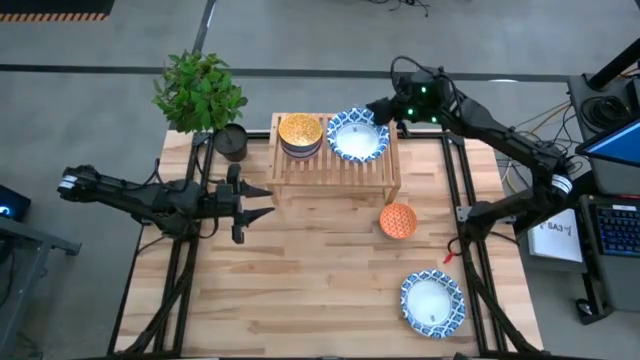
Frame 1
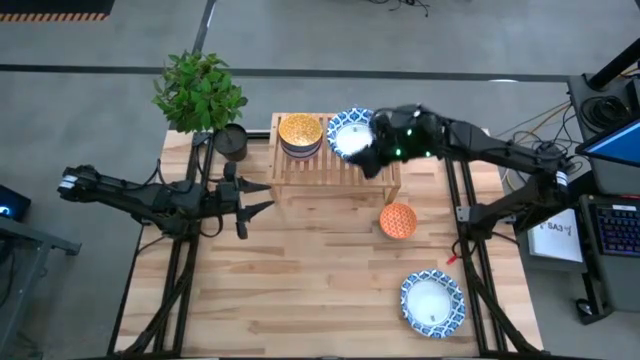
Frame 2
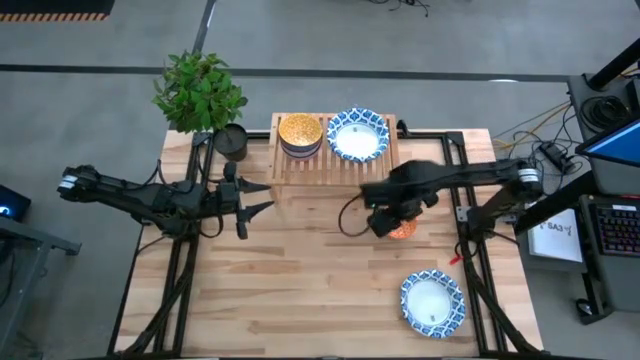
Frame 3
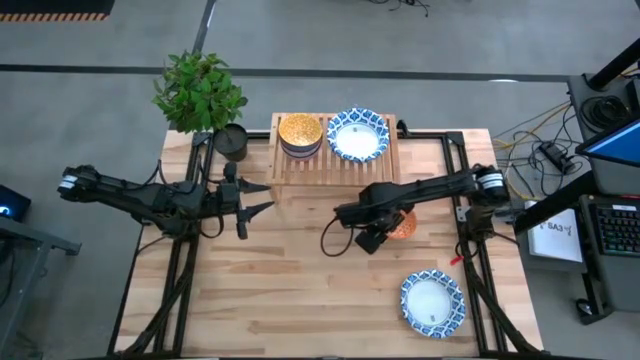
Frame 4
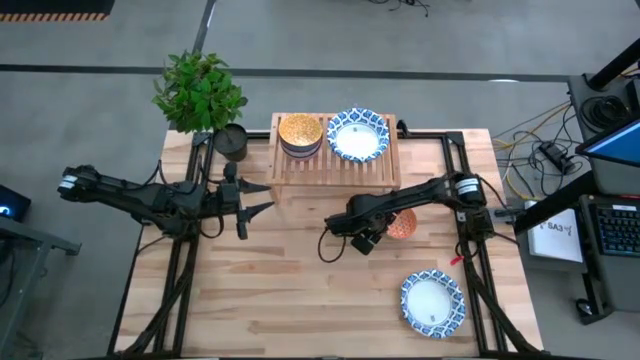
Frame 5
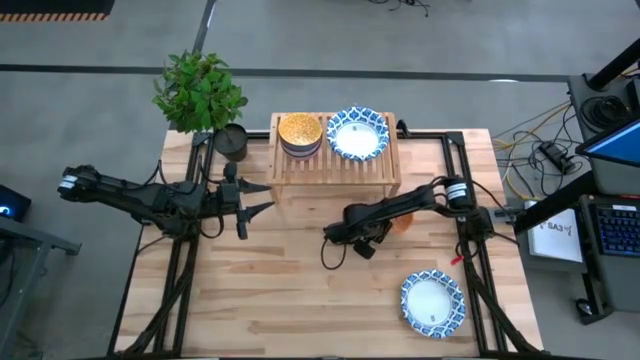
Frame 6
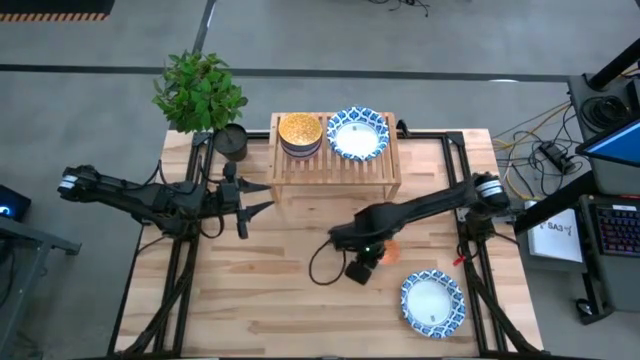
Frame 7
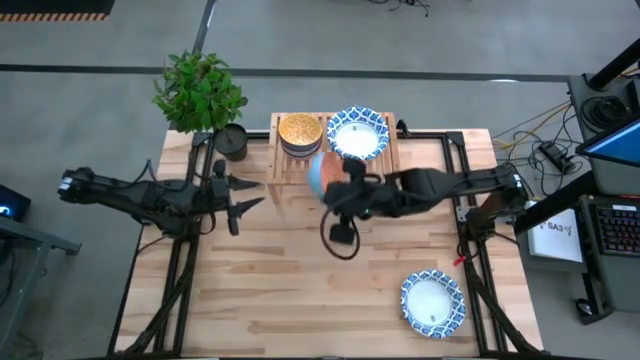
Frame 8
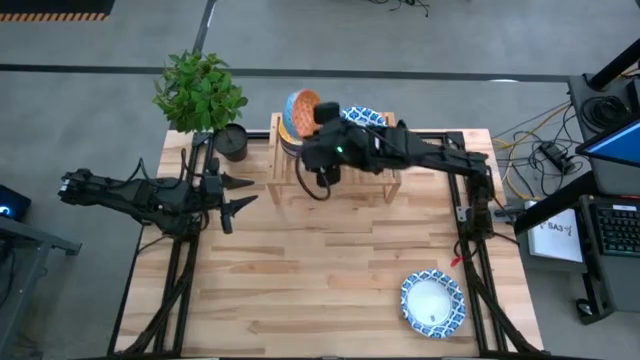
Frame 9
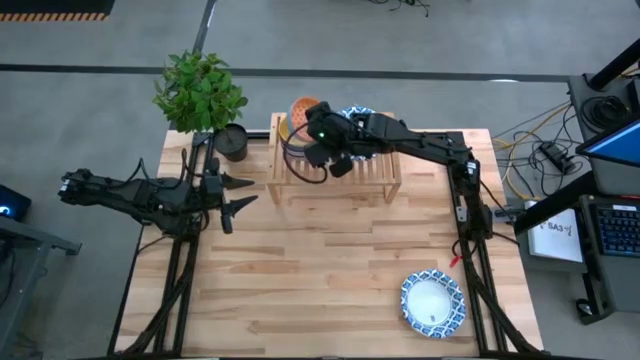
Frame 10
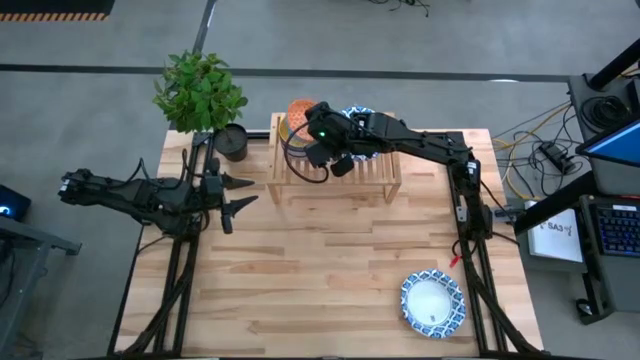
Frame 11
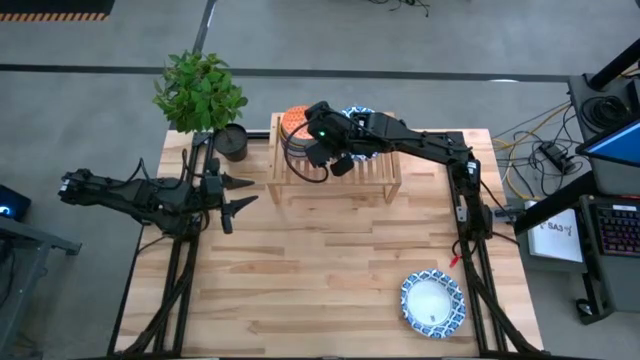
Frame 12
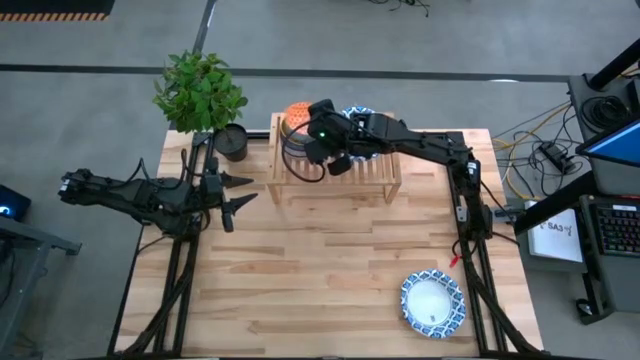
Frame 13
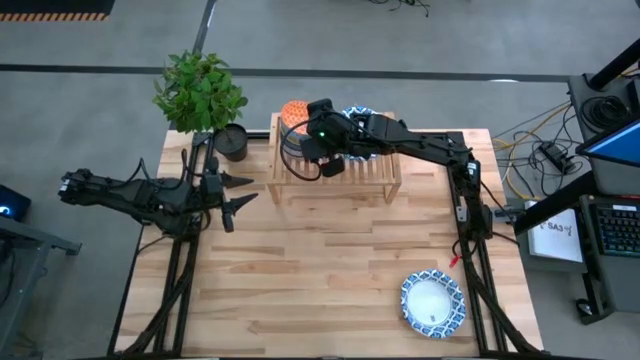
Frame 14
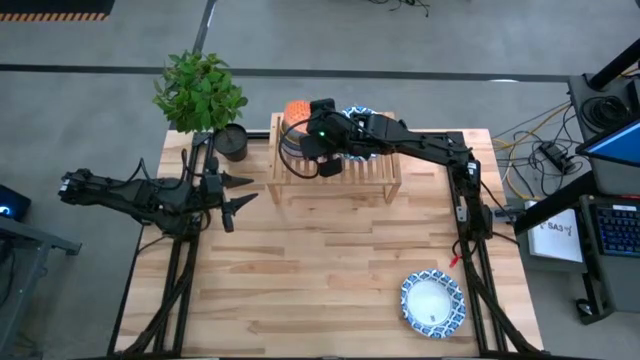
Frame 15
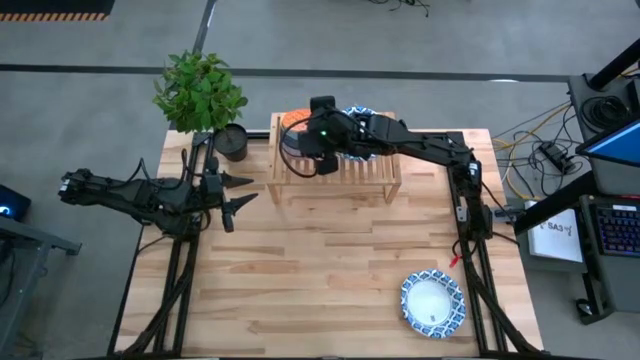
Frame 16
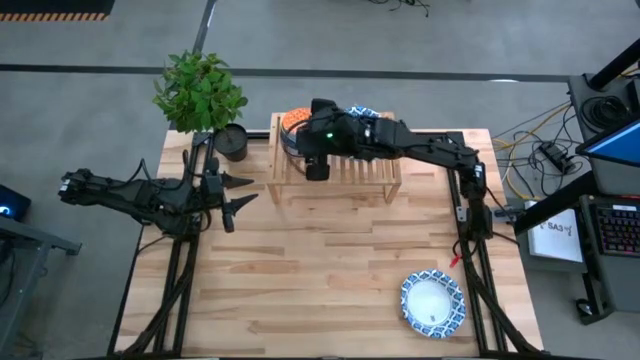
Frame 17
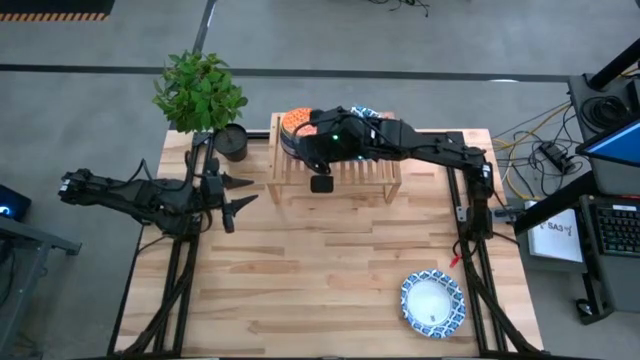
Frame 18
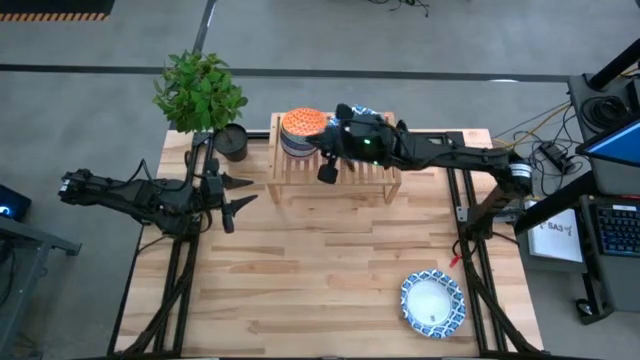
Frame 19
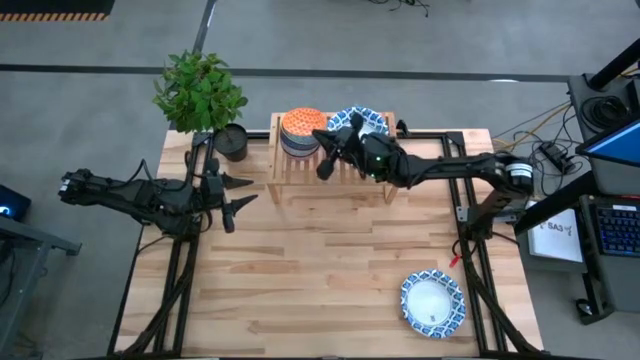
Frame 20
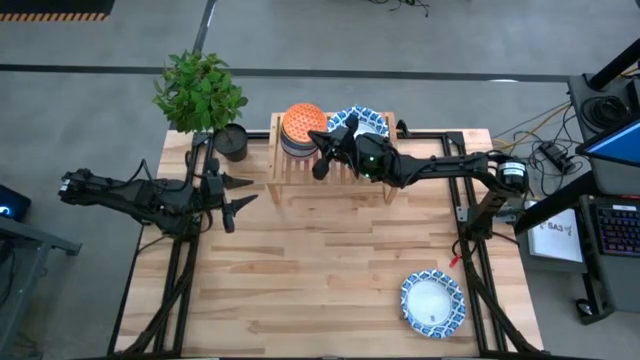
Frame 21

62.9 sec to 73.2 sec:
Task: Place and stack bowls onto a shelf
Stack the orange bowl on top of the yellow bowl on the shelf

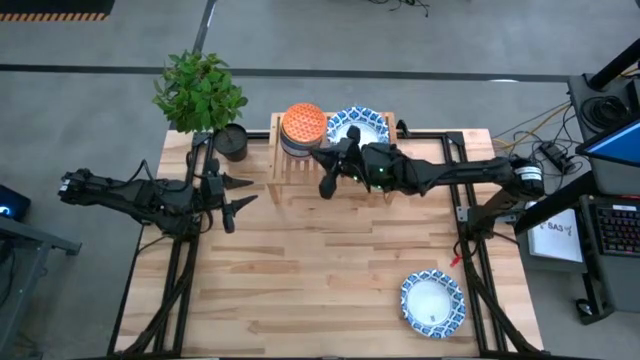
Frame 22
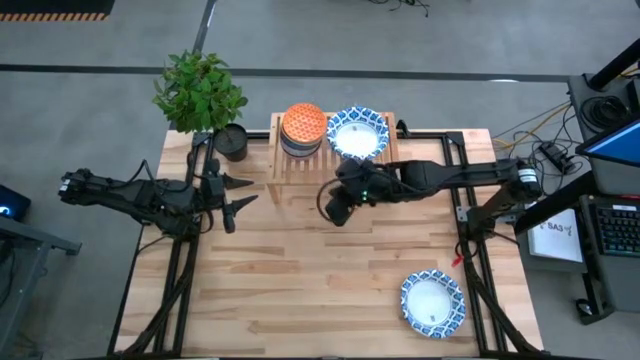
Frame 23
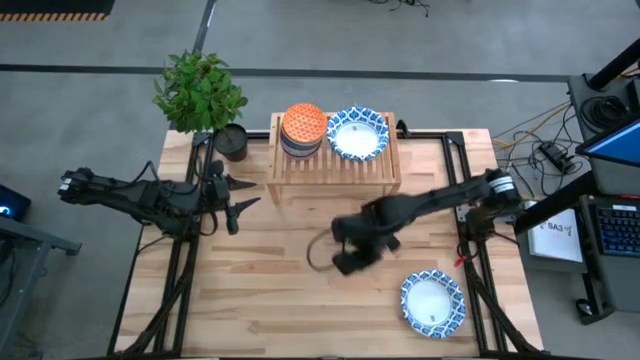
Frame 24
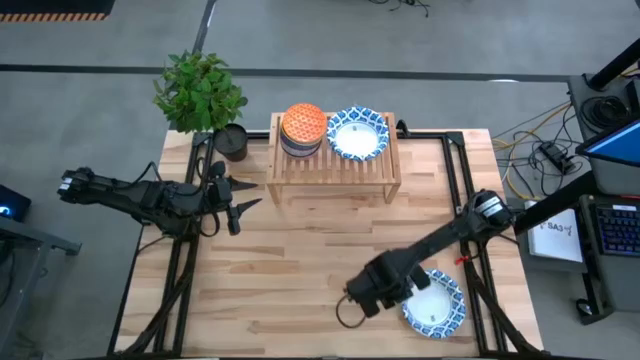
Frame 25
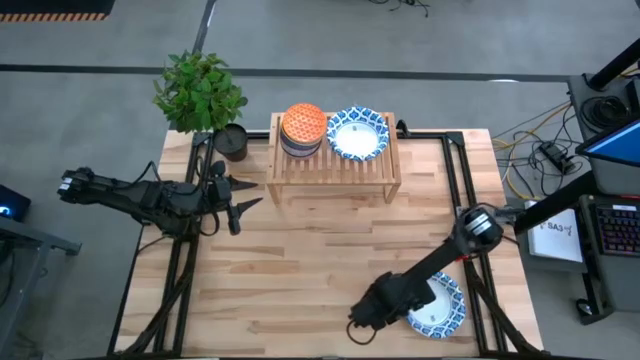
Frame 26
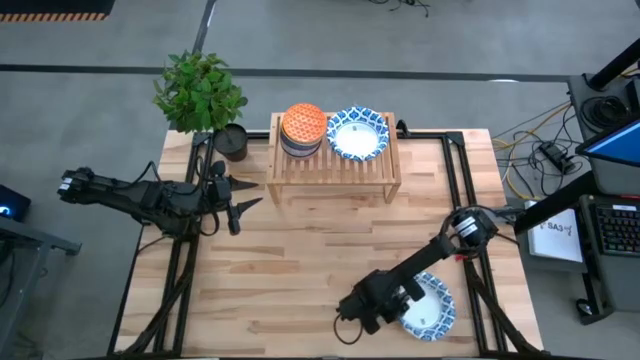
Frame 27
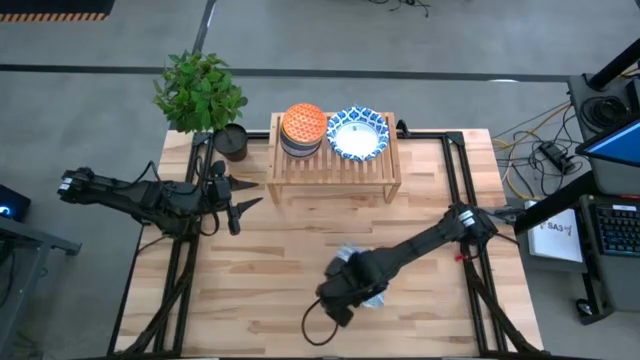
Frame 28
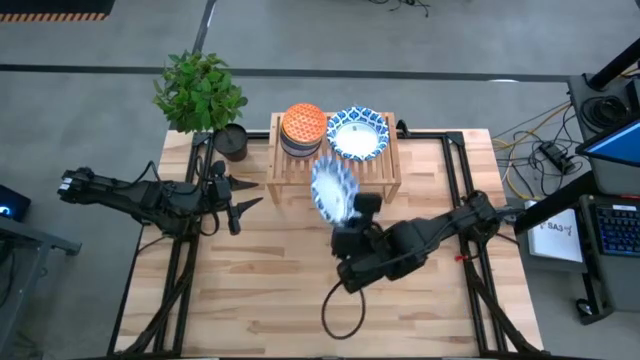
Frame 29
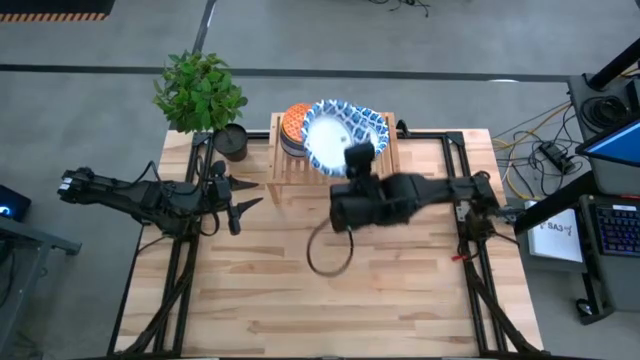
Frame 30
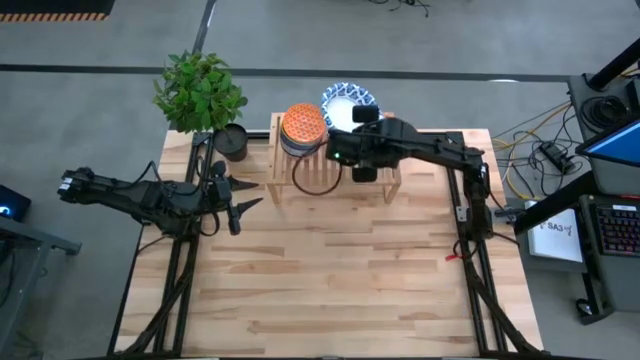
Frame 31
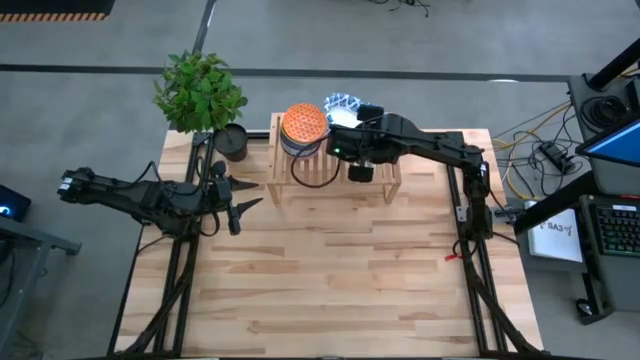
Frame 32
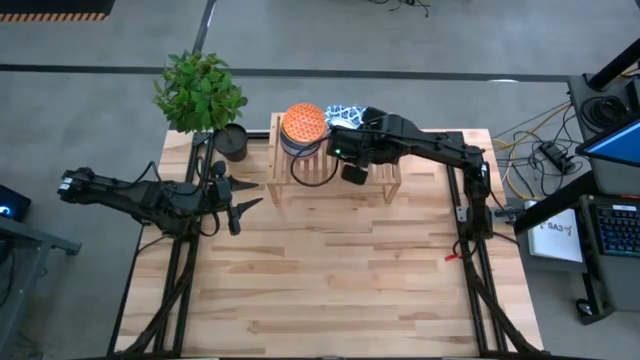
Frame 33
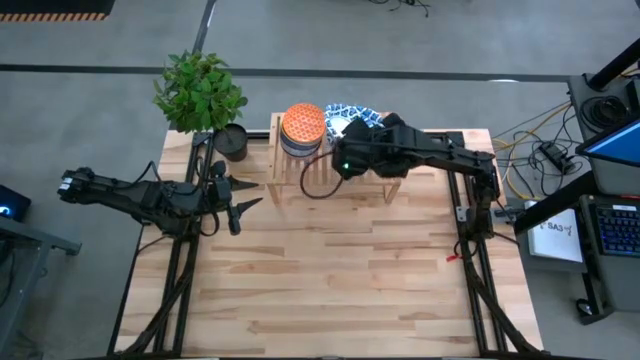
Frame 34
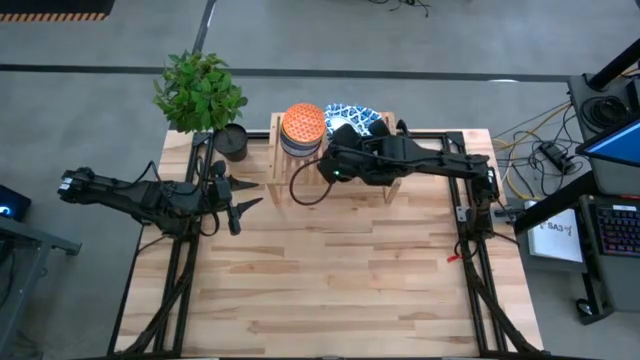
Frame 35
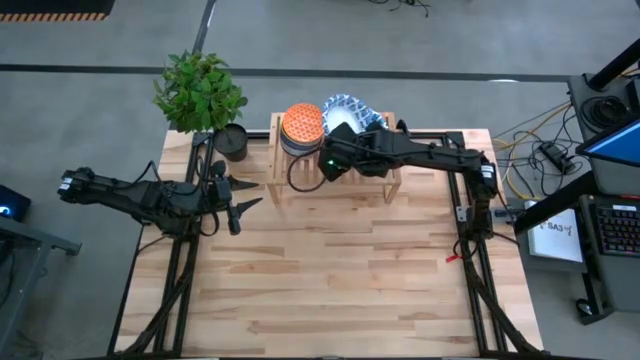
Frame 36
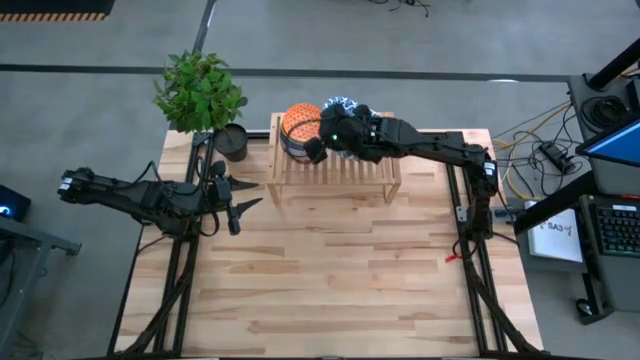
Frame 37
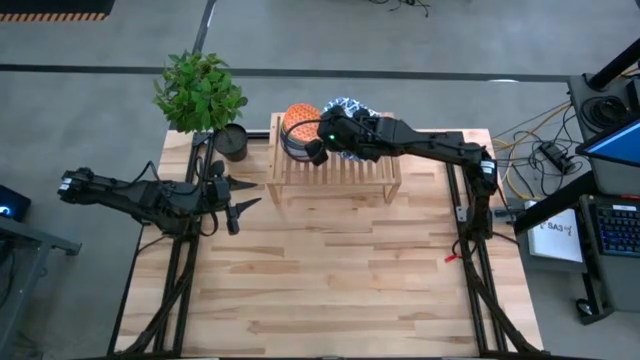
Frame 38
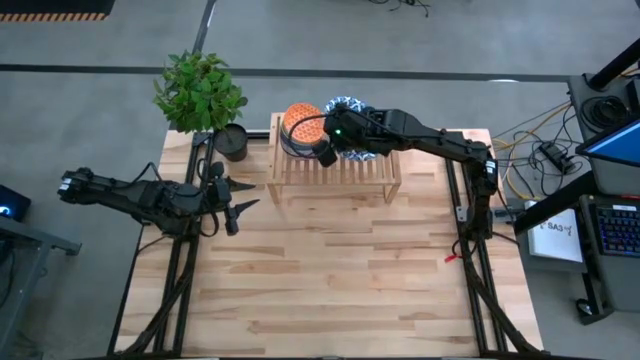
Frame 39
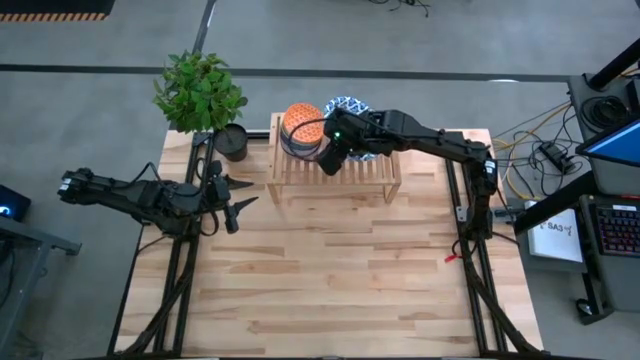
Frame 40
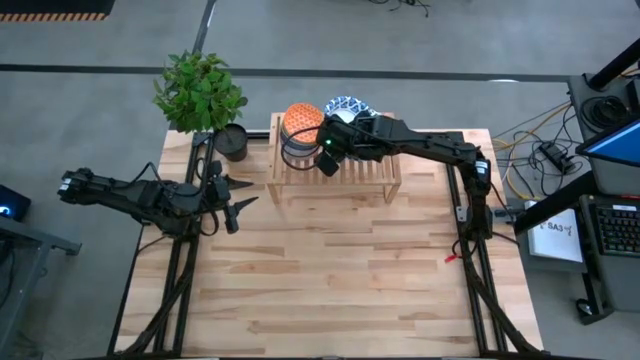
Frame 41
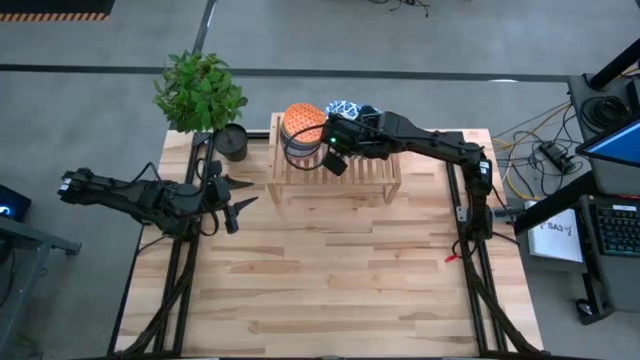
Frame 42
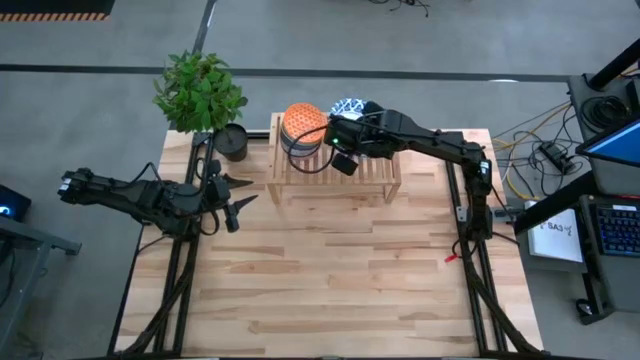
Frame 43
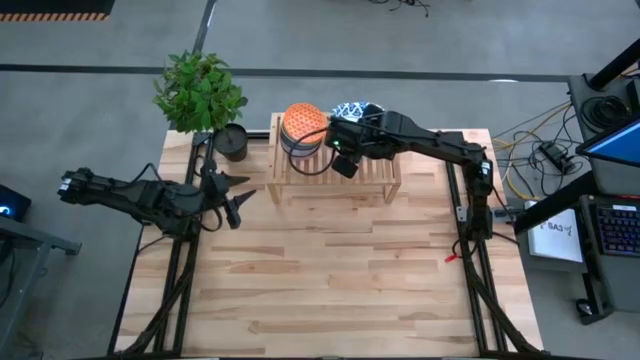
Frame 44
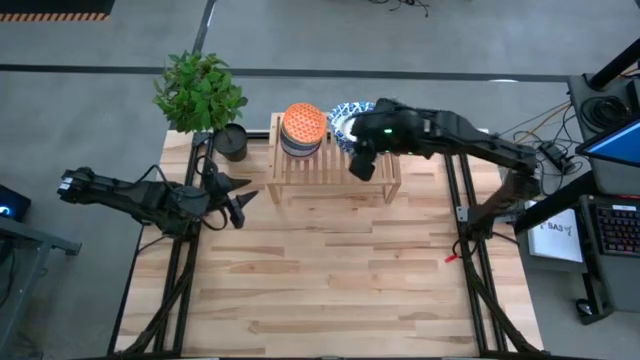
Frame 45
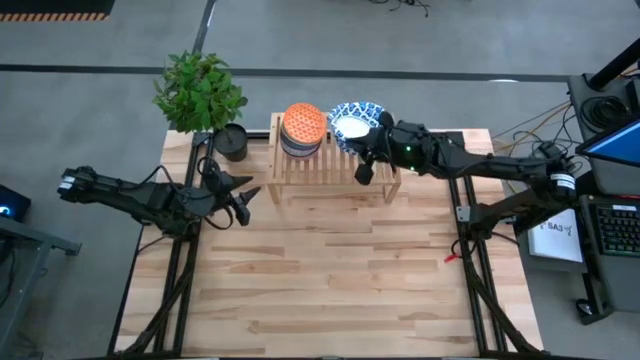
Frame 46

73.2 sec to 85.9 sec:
Stack the white patterned bowl on top of the other white patterned bowl on the shelf
